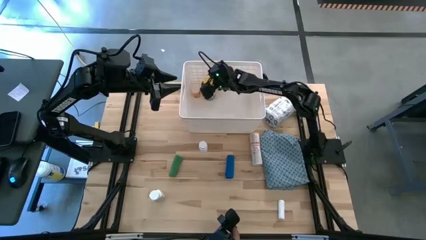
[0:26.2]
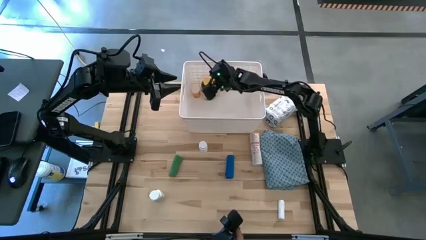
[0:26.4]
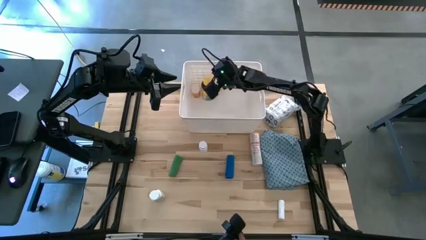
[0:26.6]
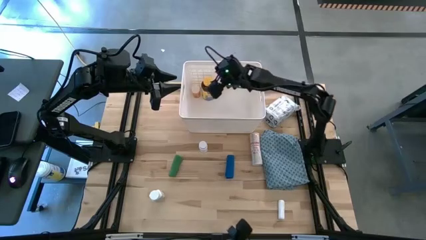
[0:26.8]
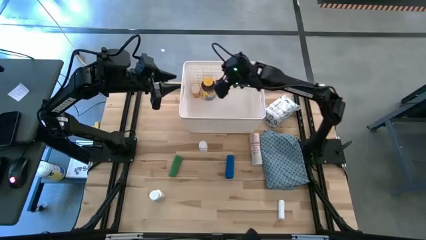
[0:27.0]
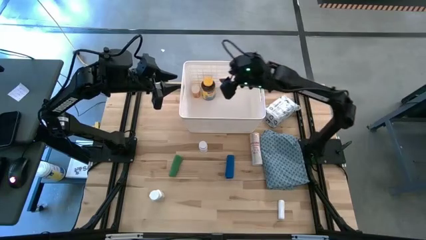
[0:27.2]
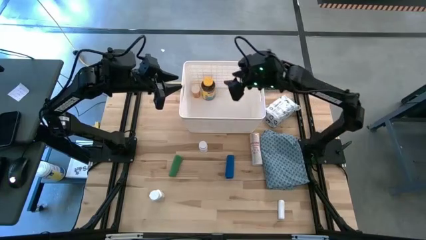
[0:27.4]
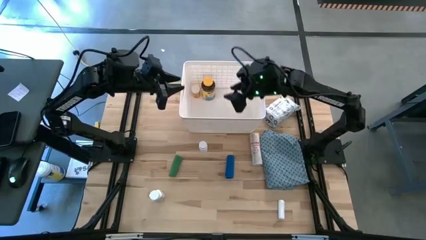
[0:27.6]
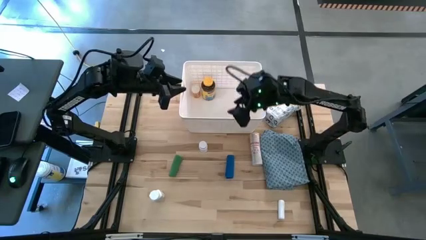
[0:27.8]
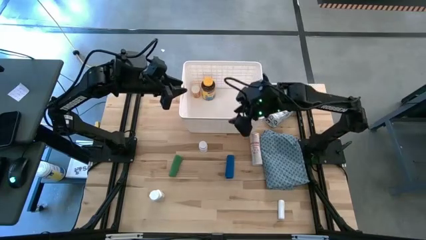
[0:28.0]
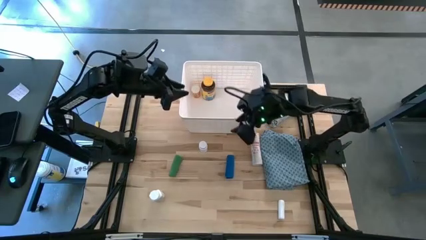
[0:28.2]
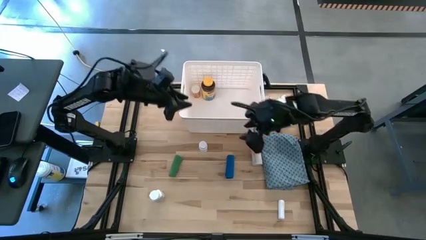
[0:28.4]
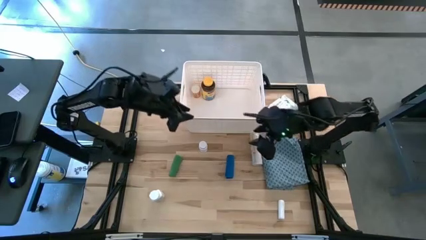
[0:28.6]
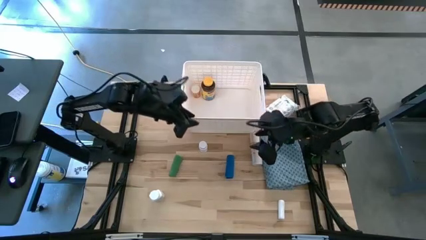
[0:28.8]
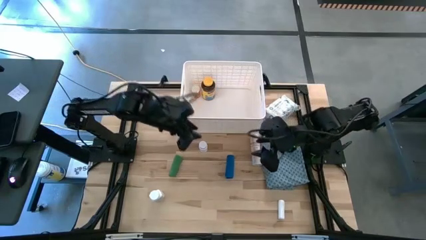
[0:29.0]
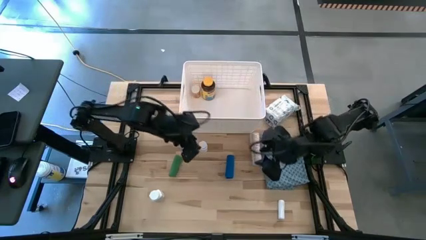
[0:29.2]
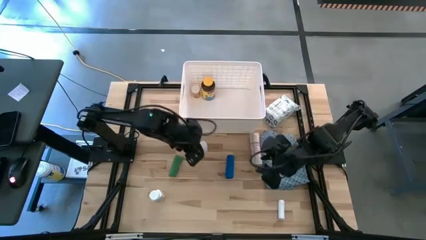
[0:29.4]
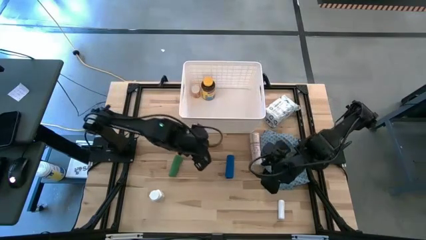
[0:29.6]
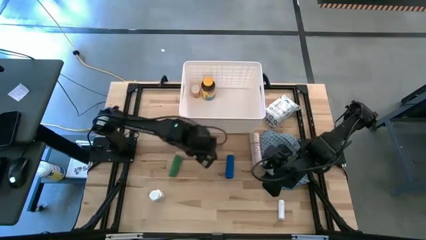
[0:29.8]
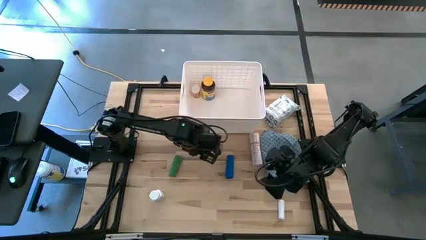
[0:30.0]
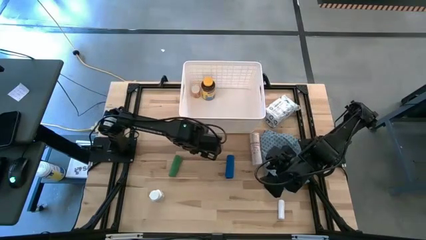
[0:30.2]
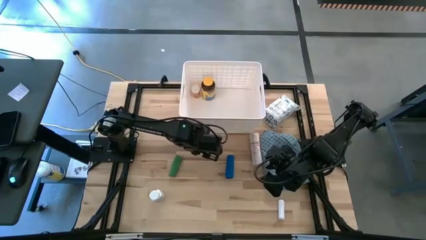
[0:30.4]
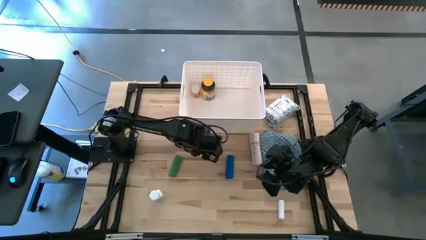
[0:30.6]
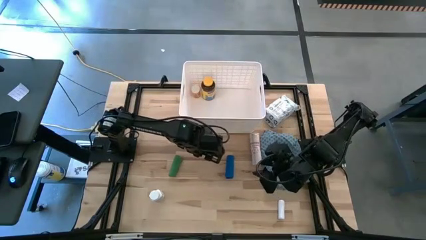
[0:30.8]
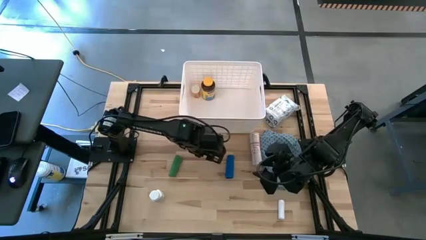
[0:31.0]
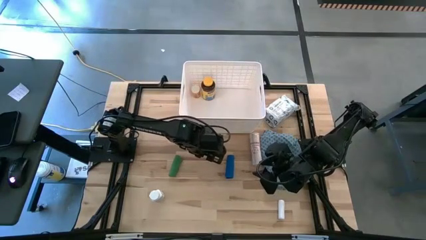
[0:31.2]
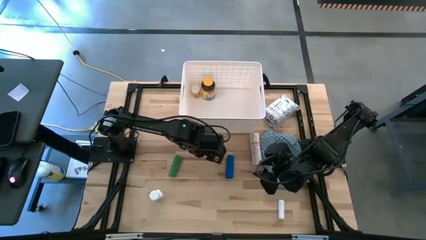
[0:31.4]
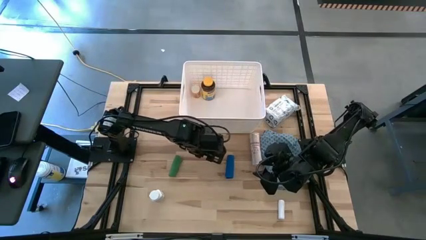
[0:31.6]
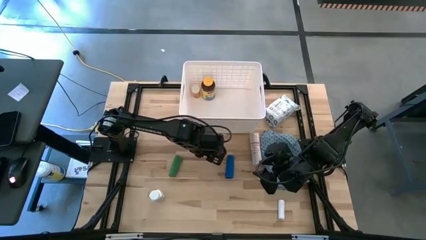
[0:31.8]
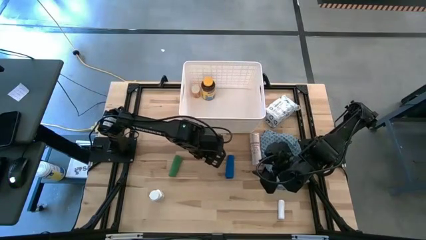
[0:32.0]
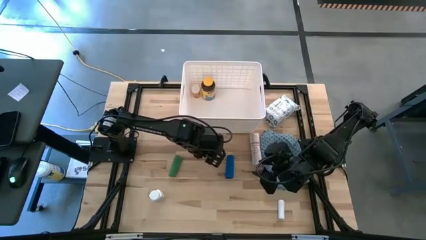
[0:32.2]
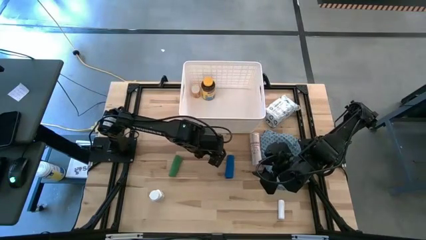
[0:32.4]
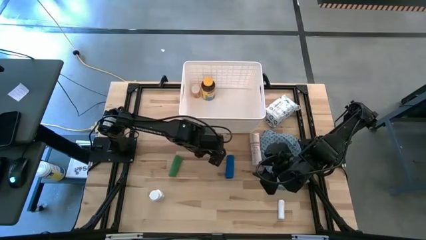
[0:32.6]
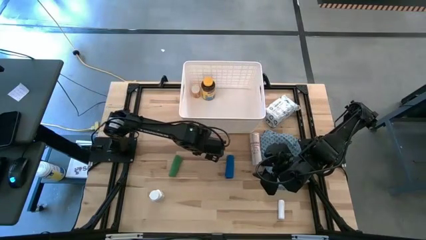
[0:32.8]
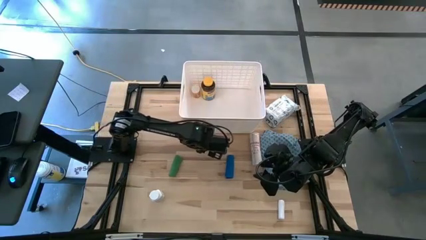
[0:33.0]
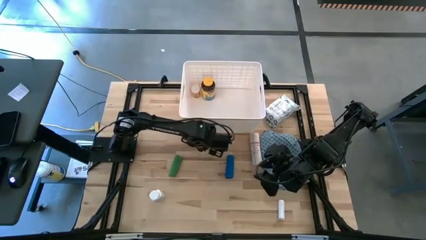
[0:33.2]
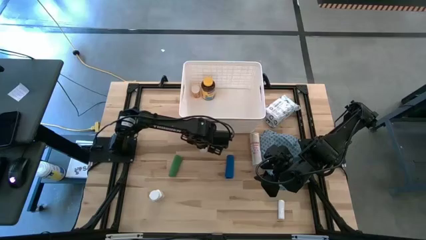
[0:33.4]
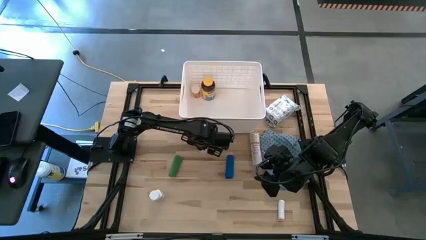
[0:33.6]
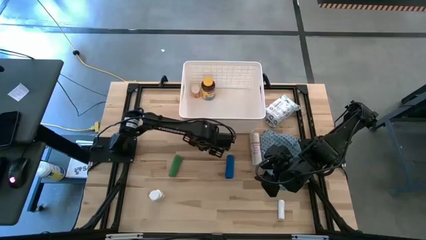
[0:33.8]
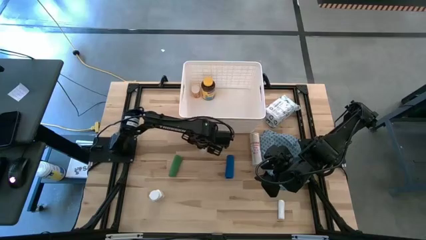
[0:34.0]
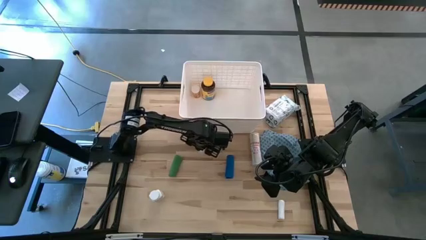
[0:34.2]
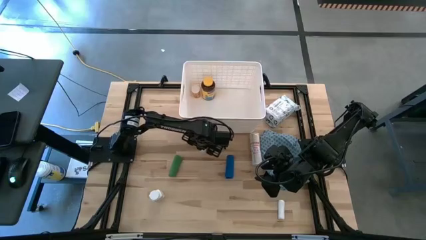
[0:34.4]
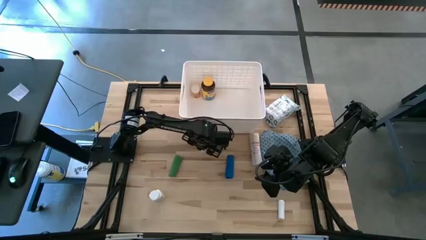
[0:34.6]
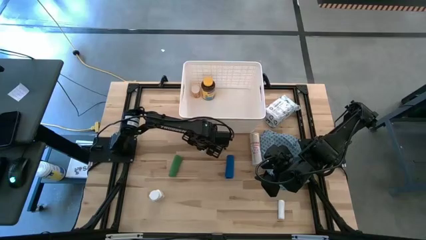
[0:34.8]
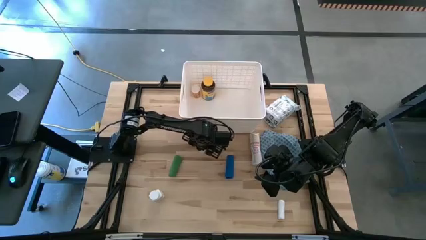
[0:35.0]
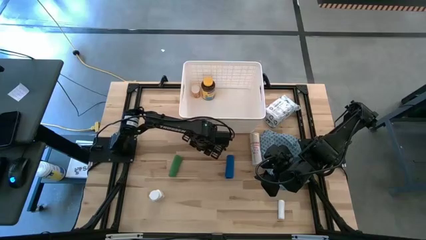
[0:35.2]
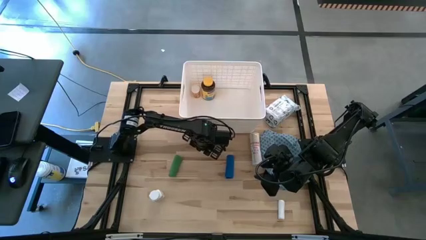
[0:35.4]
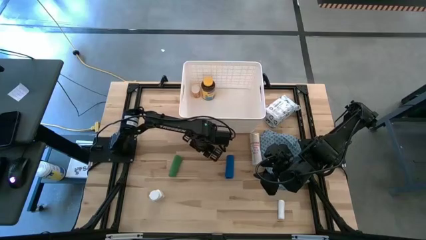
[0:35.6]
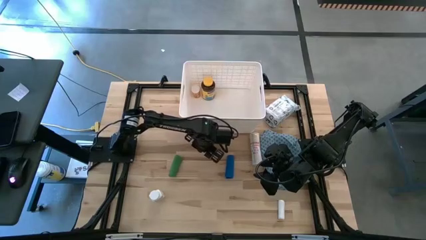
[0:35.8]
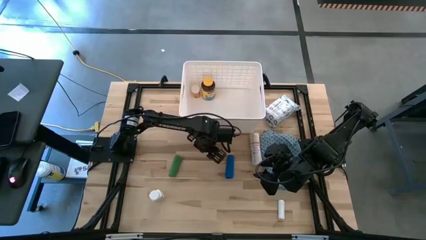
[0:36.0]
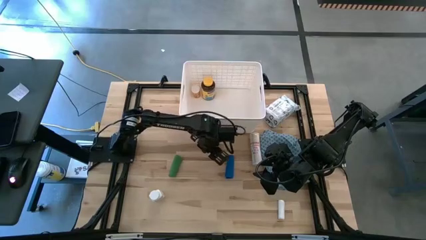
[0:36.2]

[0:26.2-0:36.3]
Task: Pick & place medical supplies in basket/bin
Put the white medicine bottle into the white bin

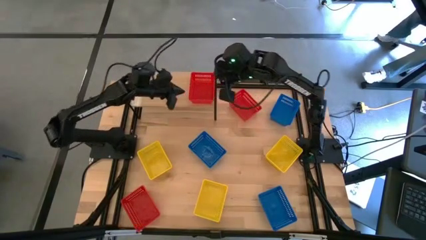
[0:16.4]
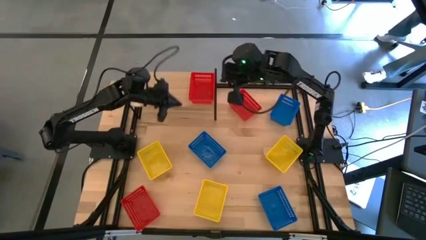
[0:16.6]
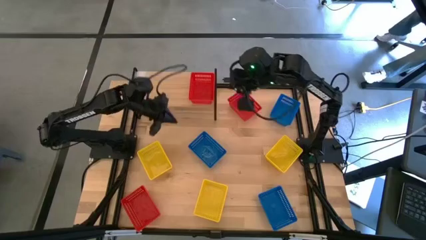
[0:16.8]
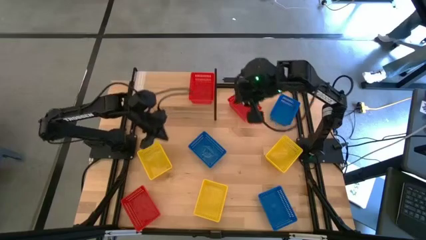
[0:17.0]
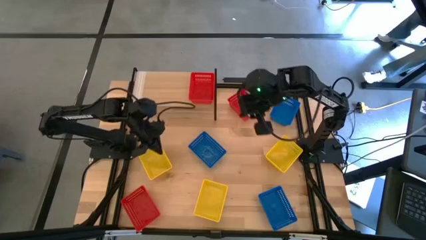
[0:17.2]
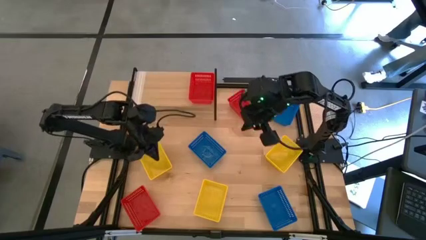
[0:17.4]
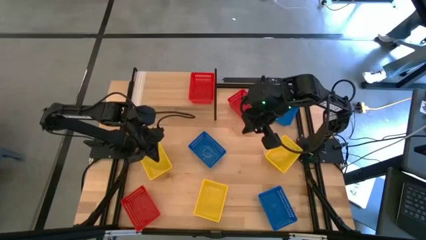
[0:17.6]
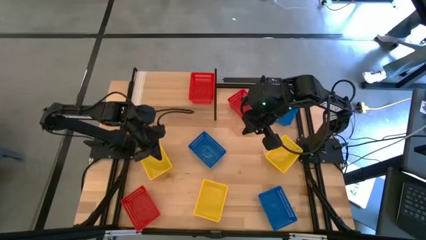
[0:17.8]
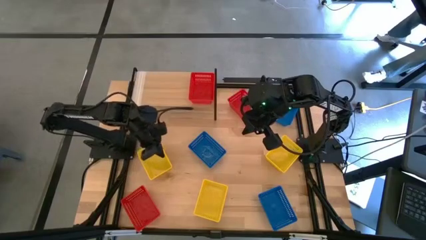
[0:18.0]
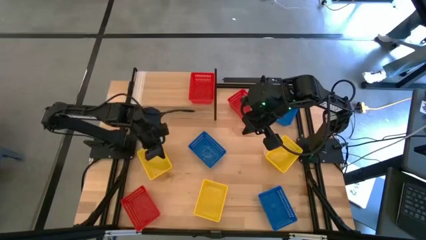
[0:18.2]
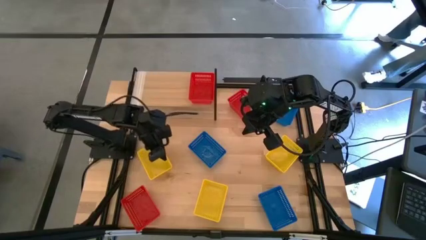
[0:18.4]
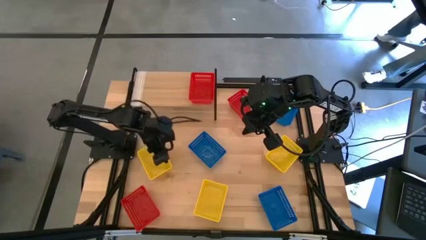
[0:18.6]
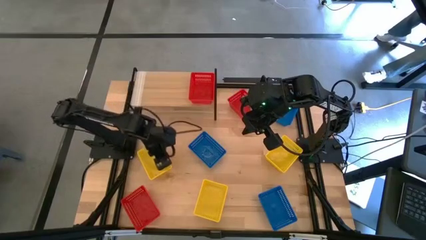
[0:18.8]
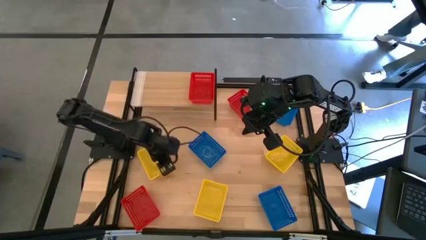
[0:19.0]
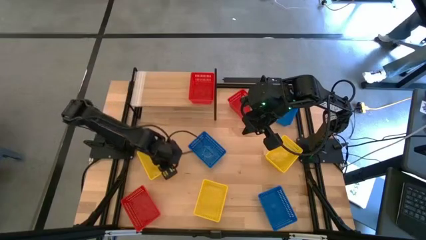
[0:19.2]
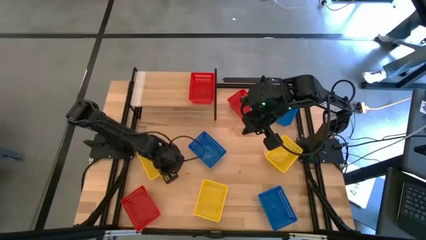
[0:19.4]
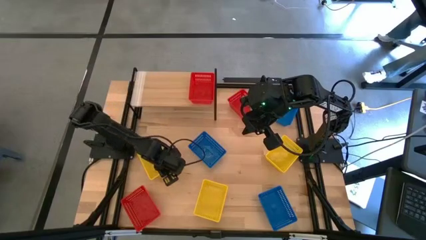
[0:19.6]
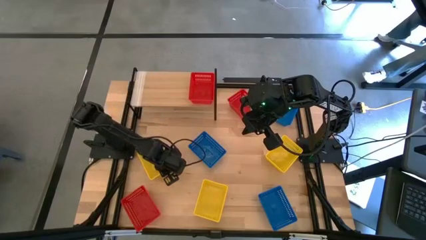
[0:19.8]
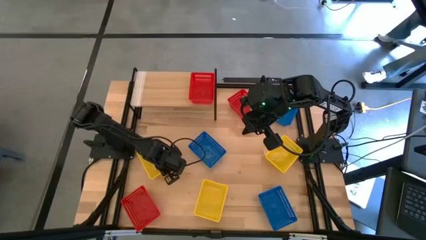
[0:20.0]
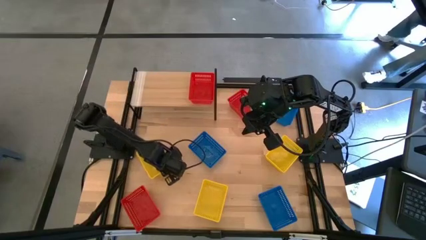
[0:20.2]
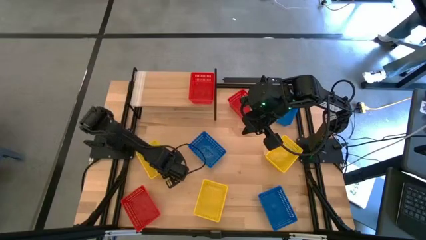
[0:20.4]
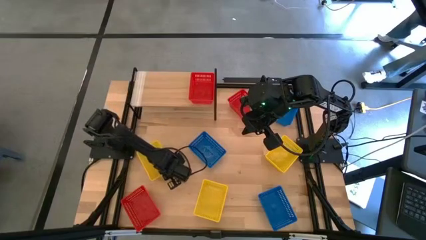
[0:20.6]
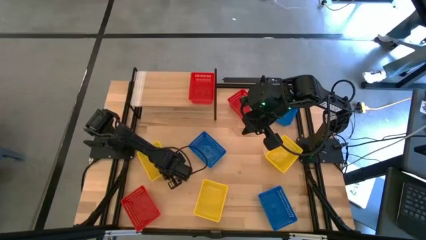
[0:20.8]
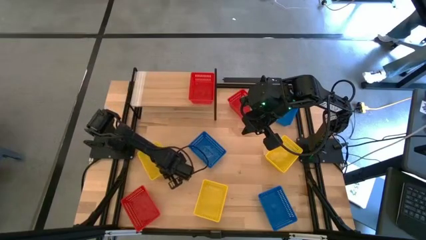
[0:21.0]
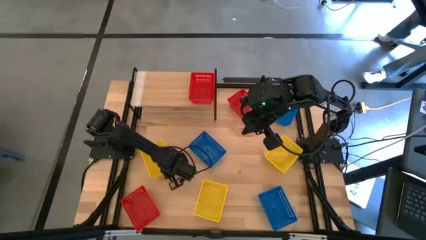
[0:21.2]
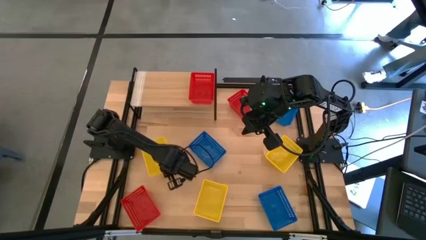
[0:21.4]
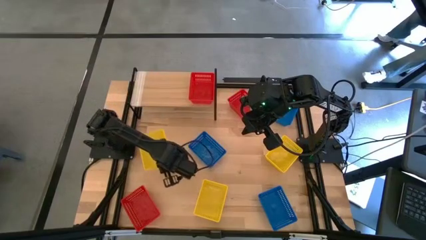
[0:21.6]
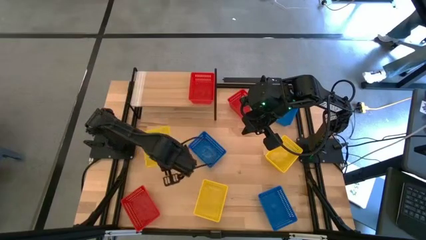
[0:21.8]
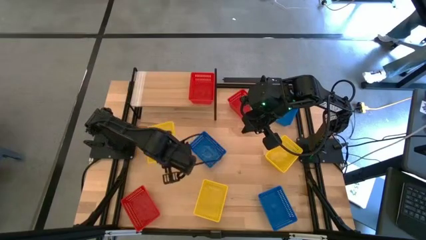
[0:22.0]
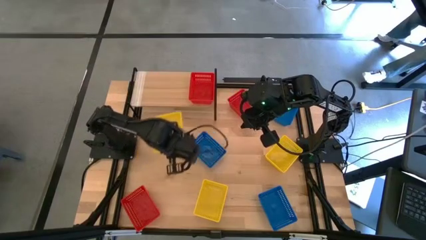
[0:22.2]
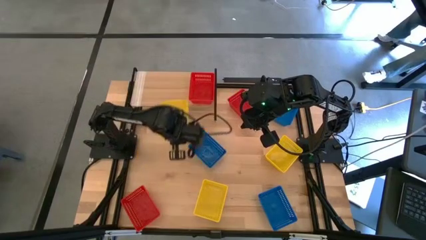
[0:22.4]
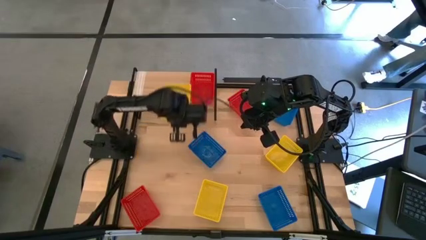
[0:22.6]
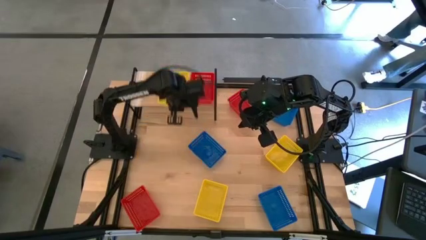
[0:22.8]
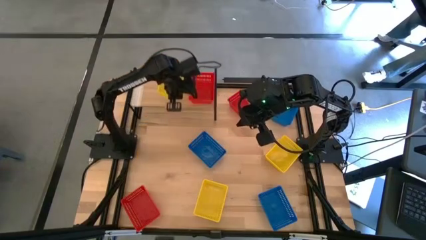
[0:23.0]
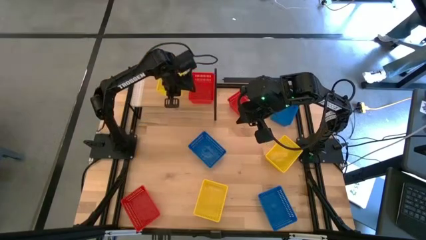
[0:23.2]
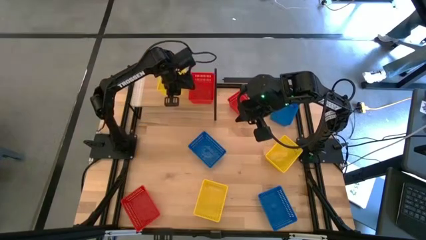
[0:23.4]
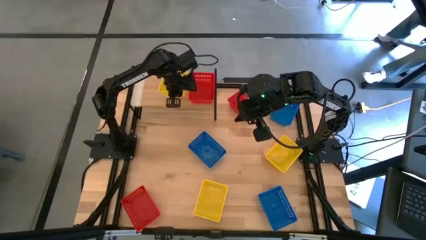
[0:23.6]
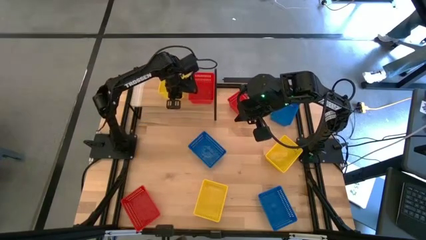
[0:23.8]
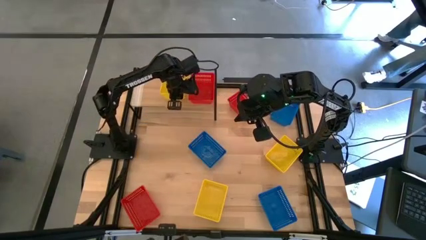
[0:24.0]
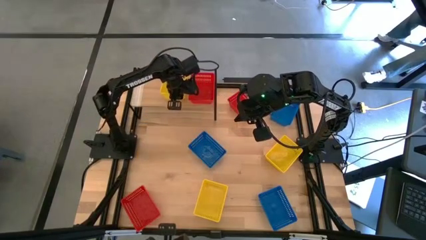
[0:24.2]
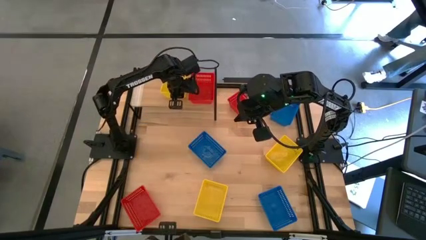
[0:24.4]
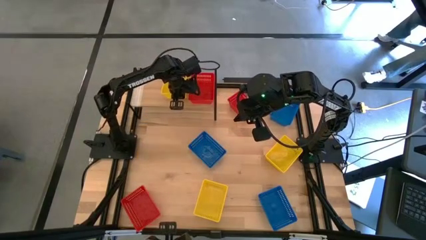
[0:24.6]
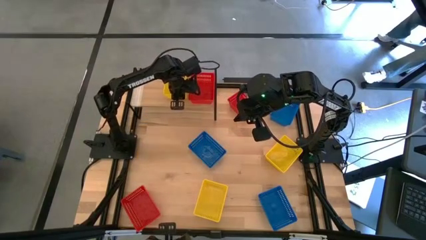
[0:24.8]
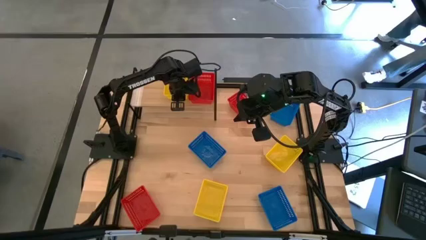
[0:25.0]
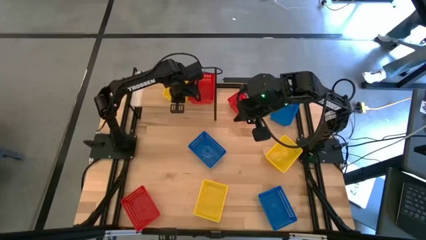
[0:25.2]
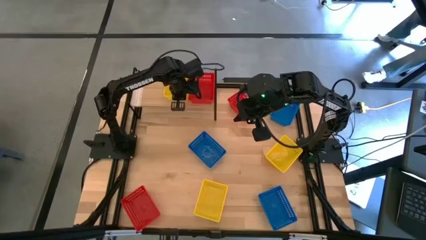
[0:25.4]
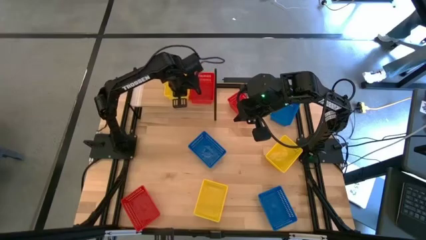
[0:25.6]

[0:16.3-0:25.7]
Task: Stack baskets on shelf by color
Put the top left yellow bin on the shelf
